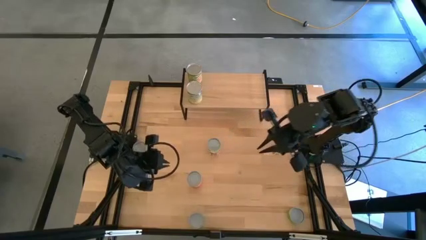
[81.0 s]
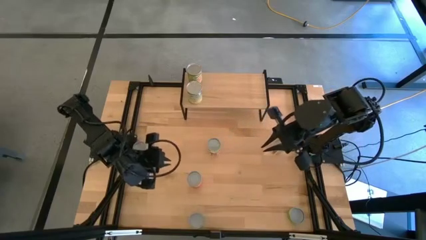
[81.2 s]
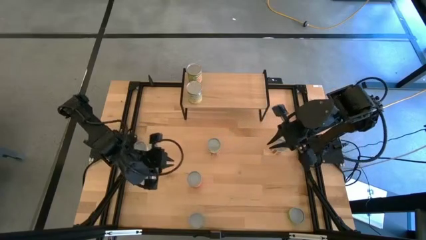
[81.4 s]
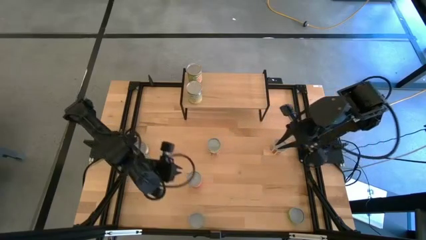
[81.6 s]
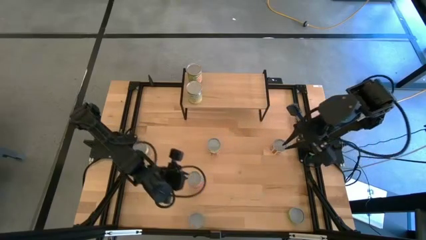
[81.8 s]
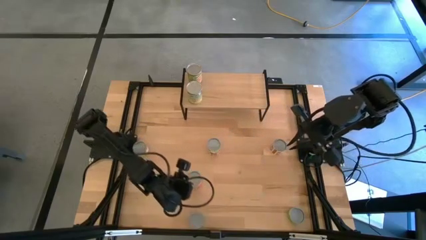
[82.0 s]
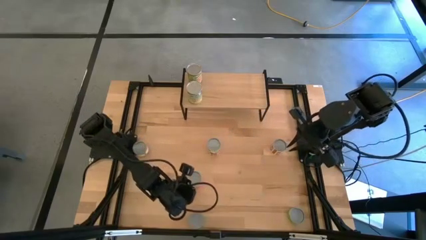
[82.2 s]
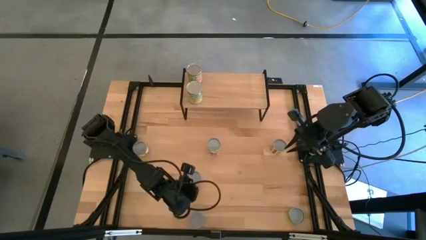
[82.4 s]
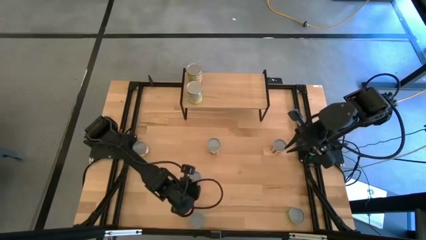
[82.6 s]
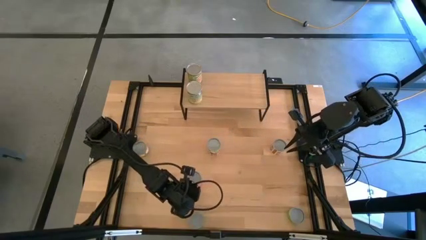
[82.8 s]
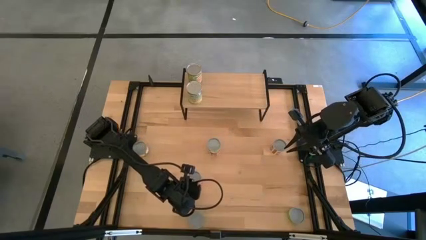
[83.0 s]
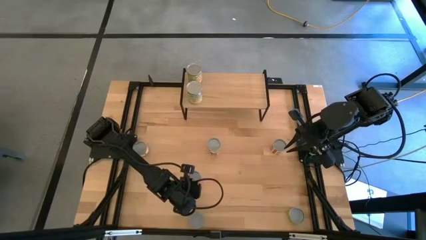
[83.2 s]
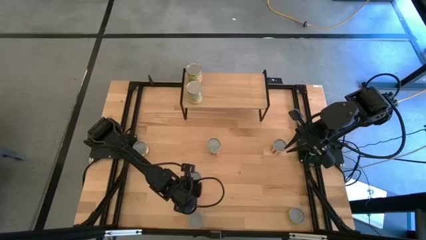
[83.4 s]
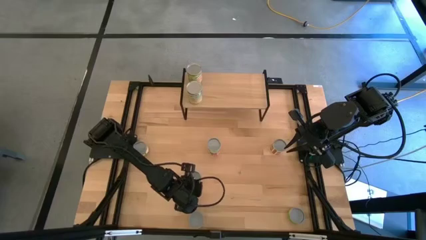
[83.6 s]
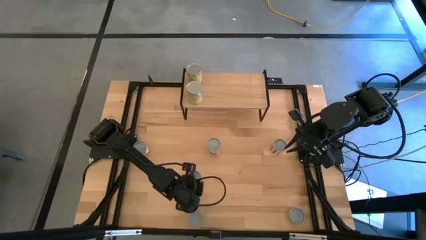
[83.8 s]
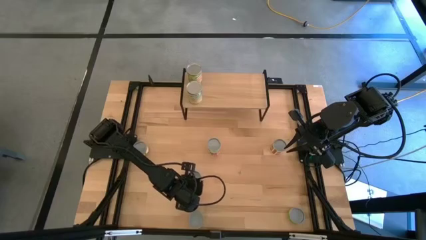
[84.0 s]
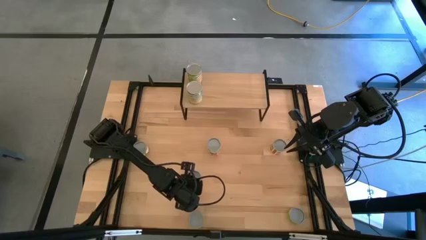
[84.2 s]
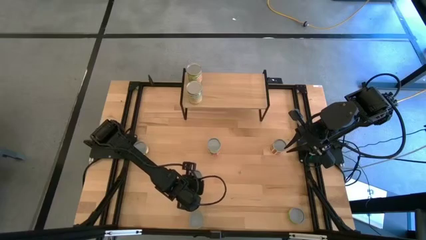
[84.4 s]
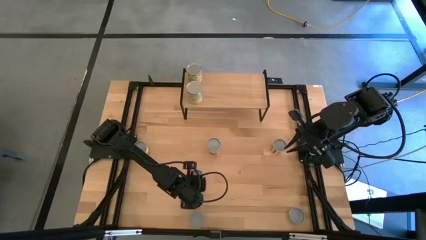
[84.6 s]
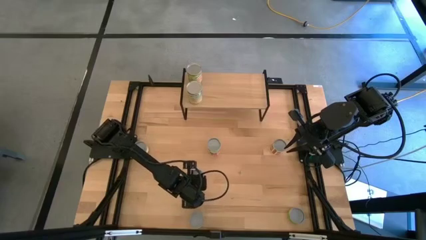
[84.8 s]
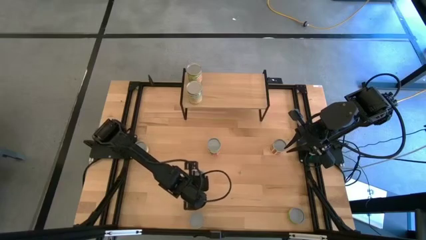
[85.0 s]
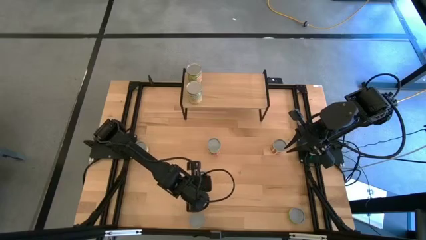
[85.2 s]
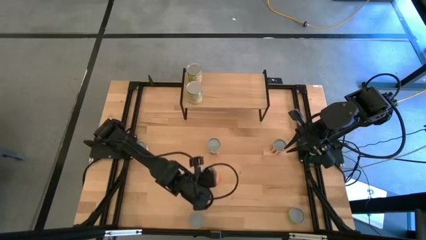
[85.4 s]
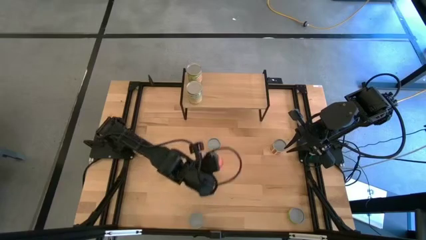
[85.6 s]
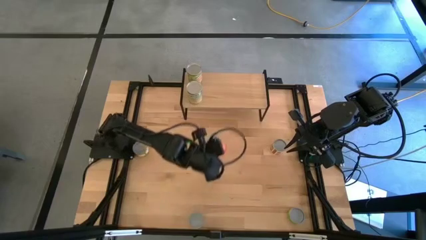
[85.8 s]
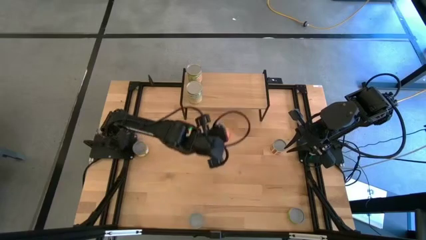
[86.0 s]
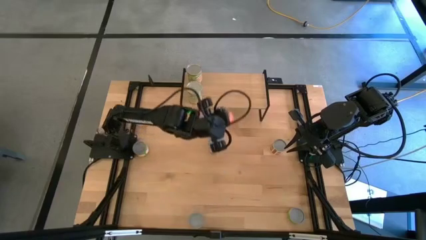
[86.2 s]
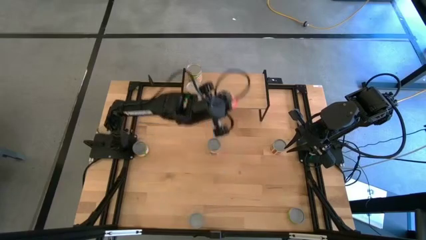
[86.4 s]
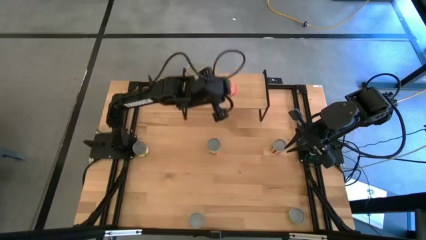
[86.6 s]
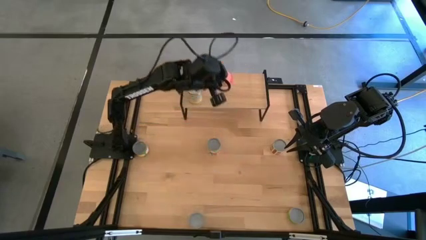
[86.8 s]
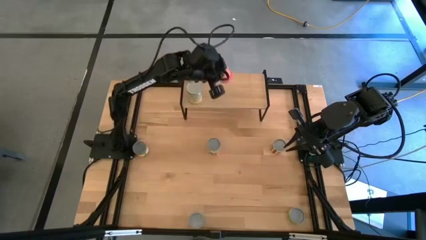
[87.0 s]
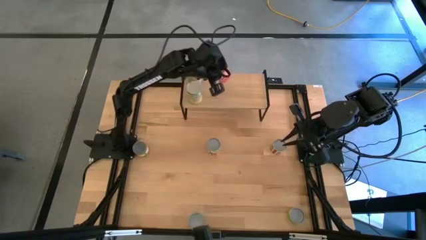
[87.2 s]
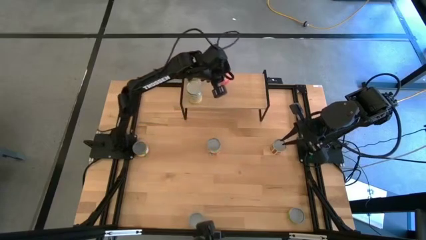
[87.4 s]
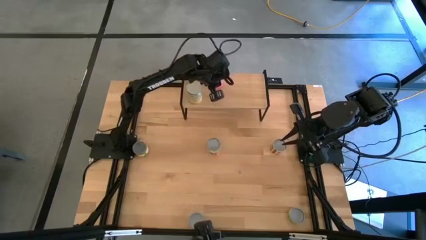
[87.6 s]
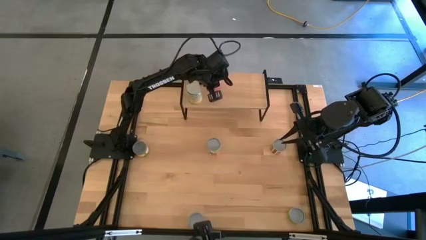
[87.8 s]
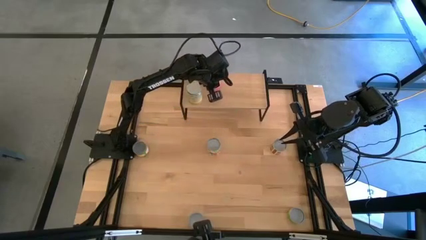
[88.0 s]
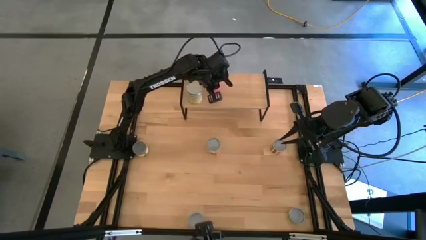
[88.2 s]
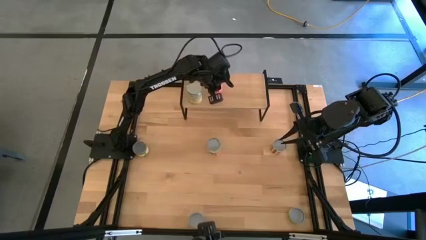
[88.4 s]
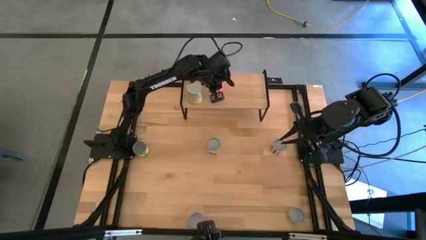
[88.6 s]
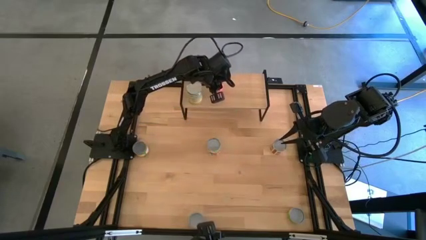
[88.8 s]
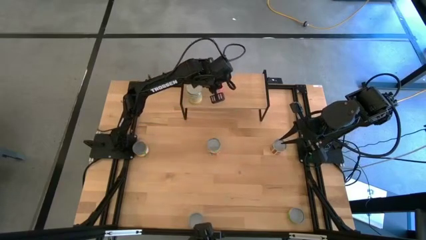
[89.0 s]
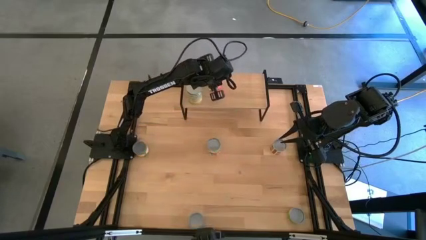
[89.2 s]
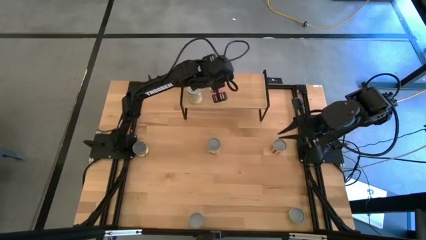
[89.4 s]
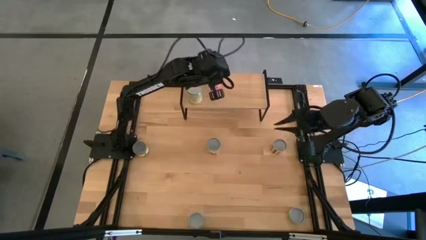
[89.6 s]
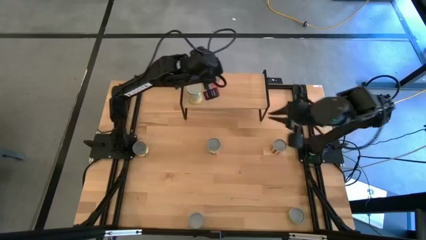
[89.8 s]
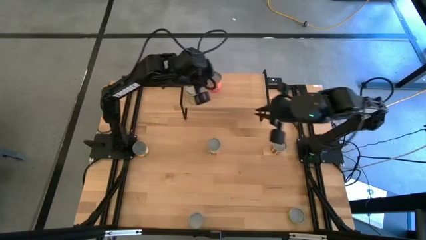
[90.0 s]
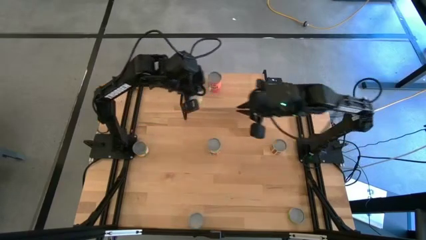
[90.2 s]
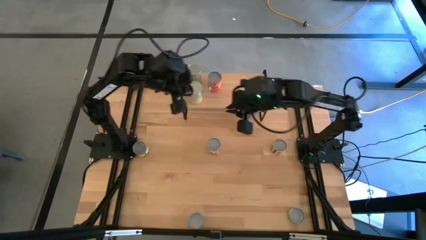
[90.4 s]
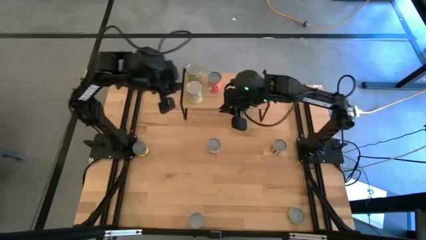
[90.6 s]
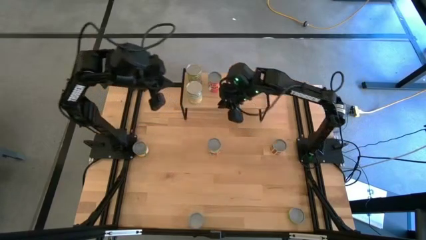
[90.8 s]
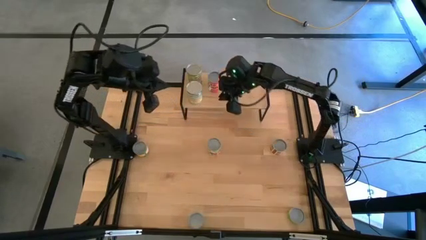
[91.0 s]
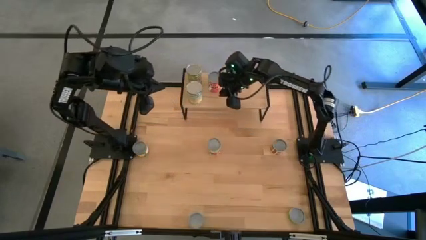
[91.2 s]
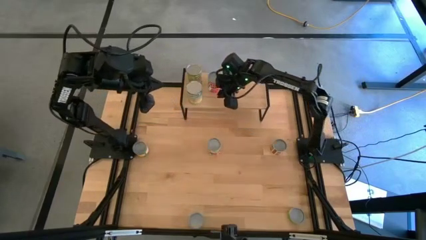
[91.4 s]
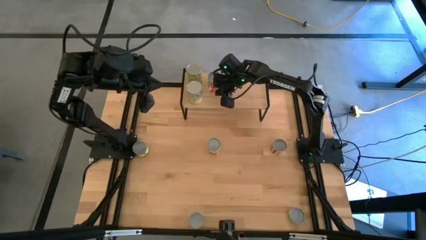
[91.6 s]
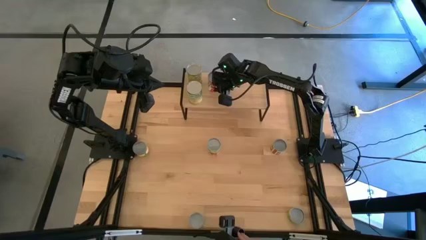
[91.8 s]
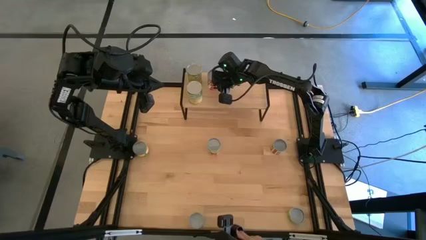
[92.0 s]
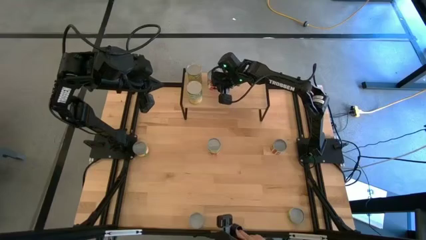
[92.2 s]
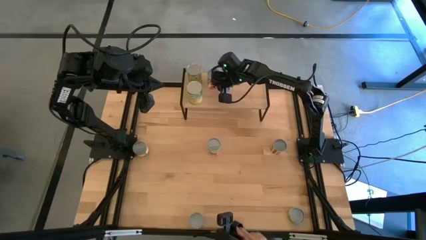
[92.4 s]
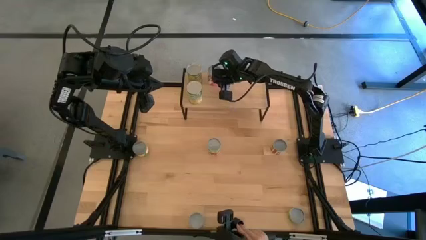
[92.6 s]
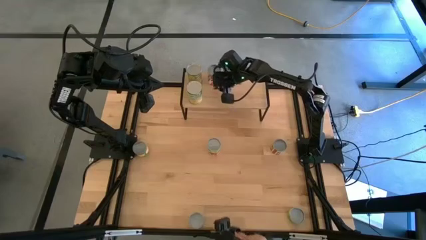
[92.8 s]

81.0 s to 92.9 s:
Task: Pick and place cans onto a shelf
Put the canned mixed fruits on the shelf
